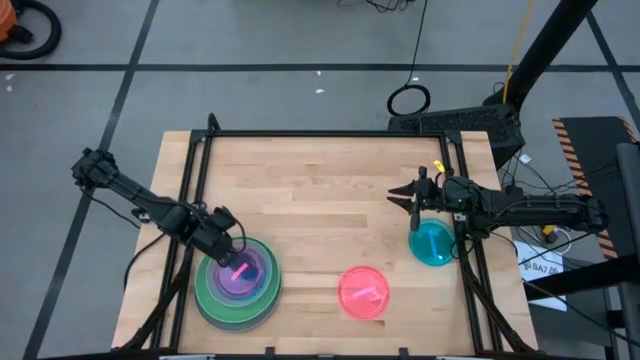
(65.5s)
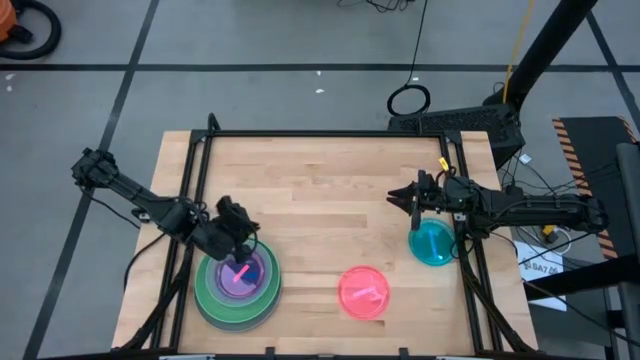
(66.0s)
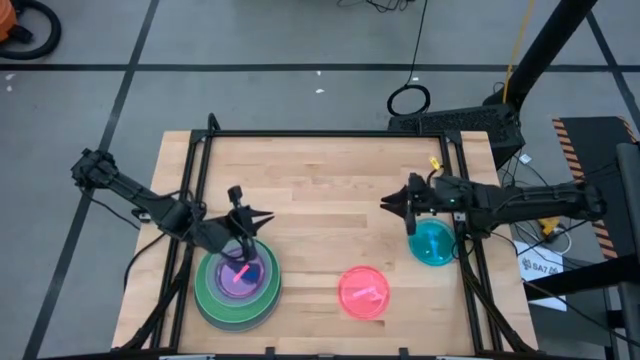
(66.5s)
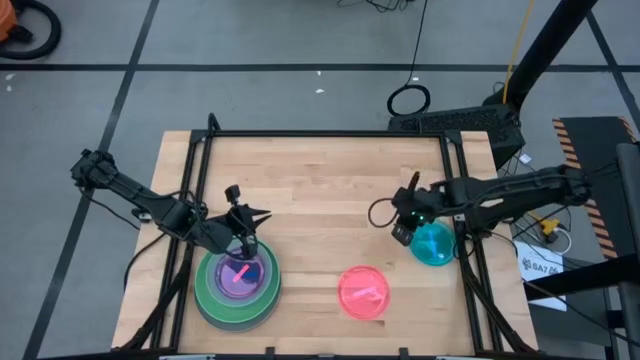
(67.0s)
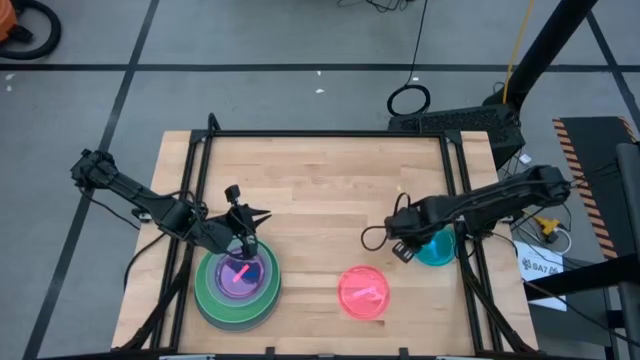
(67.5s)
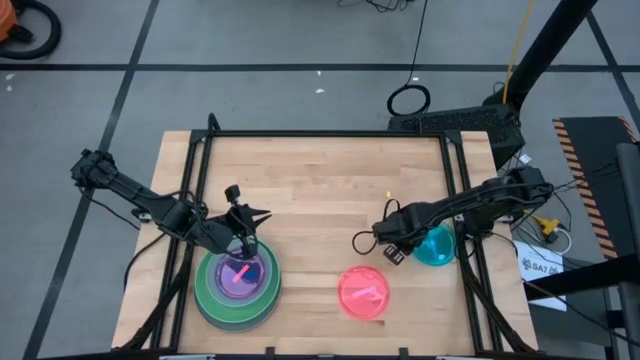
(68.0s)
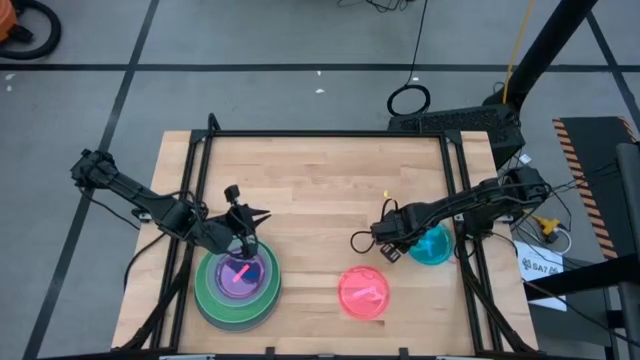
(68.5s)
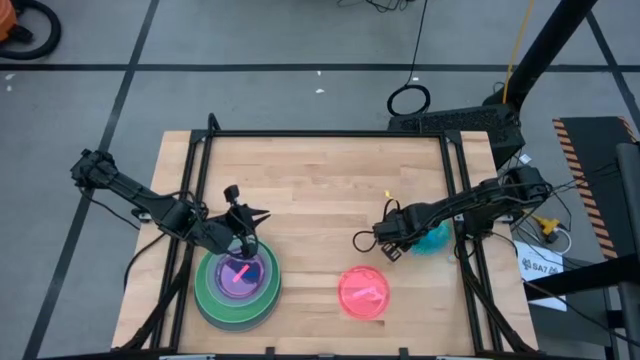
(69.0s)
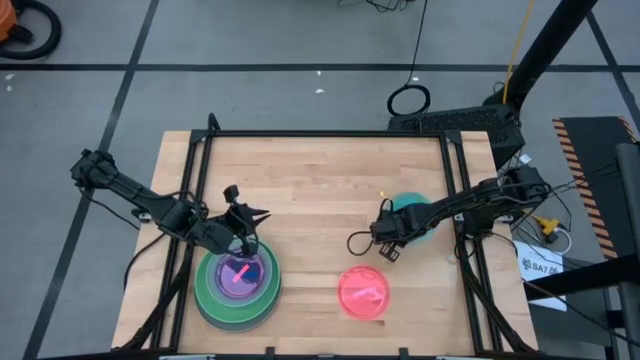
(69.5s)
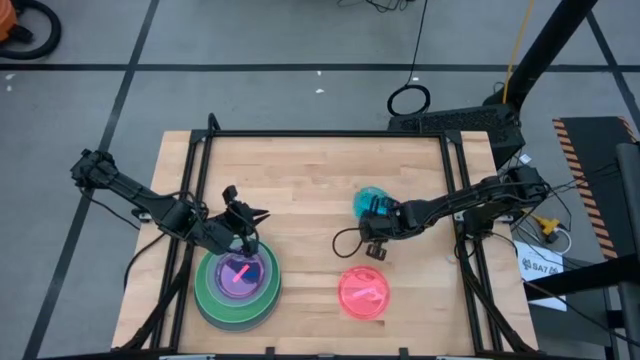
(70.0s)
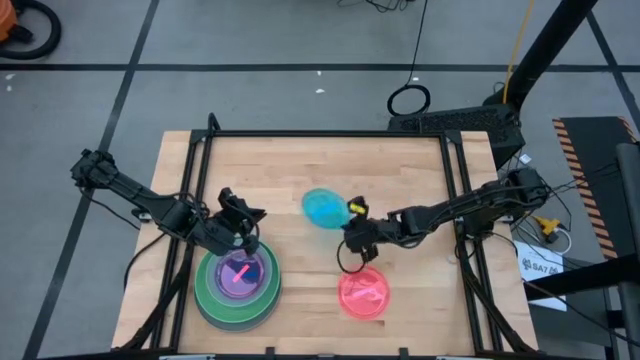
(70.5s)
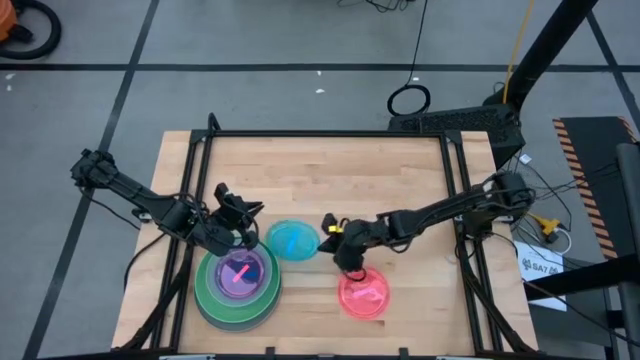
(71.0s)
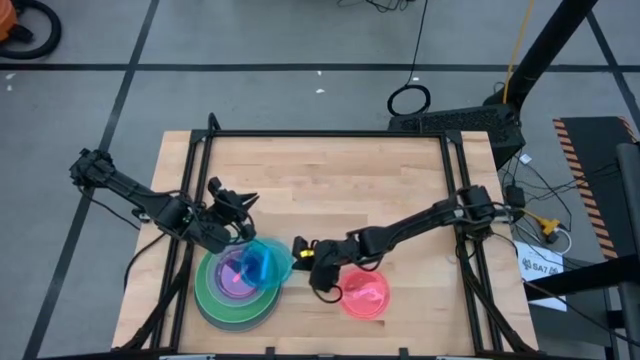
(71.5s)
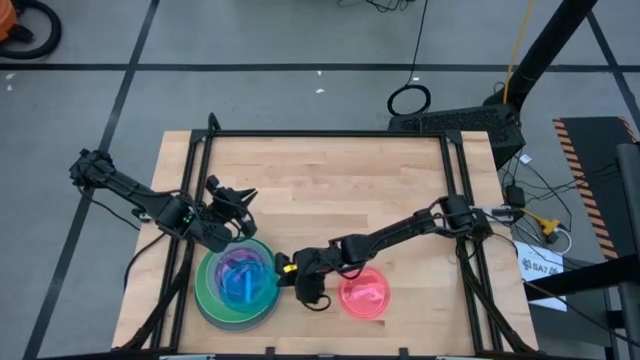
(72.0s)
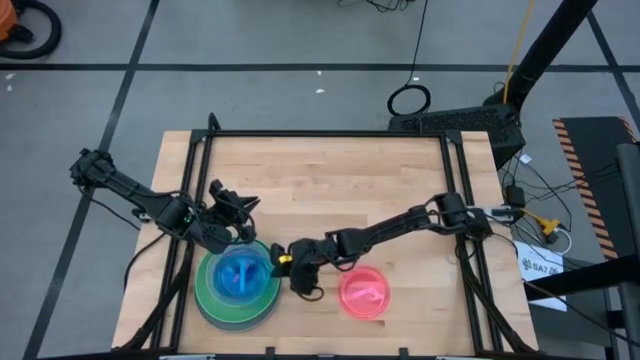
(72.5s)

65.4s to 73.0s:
Task: Stack plastic plates
Stack the transparent blue plate on the pink plate

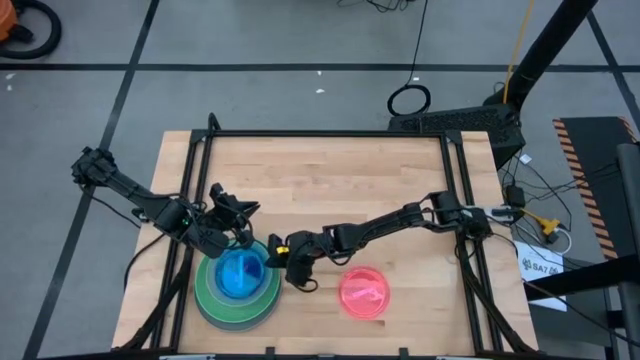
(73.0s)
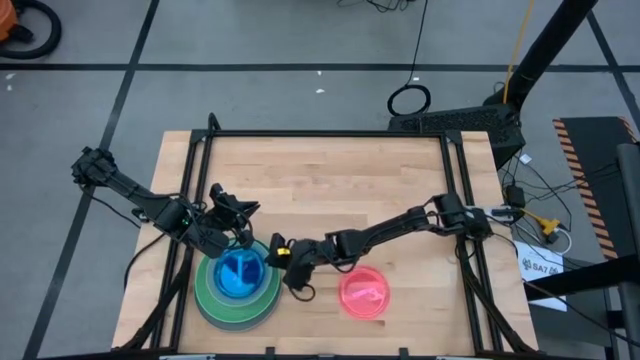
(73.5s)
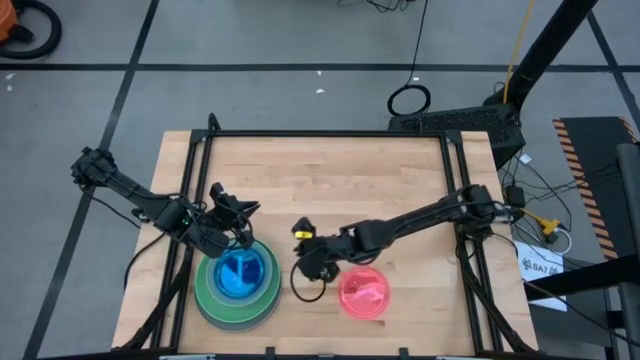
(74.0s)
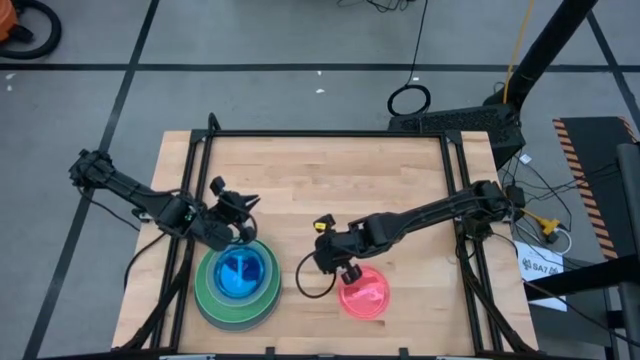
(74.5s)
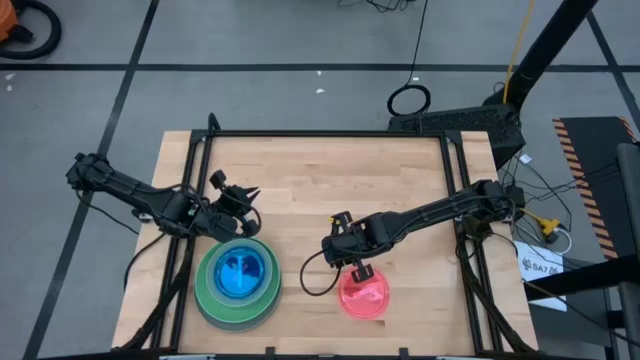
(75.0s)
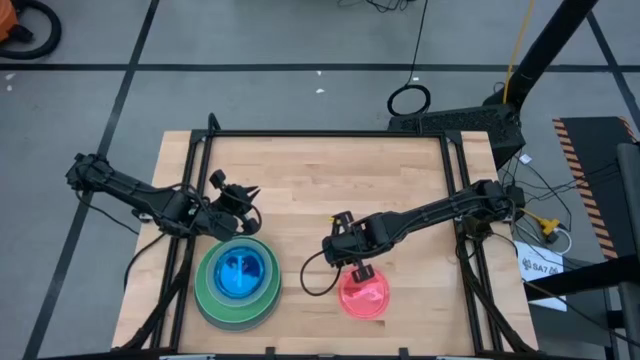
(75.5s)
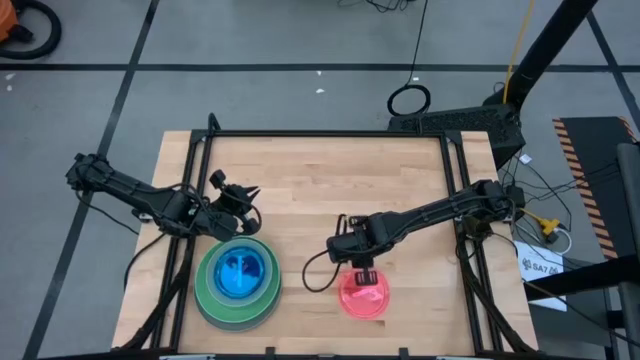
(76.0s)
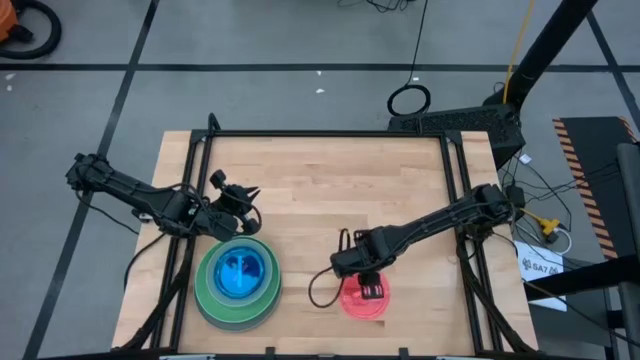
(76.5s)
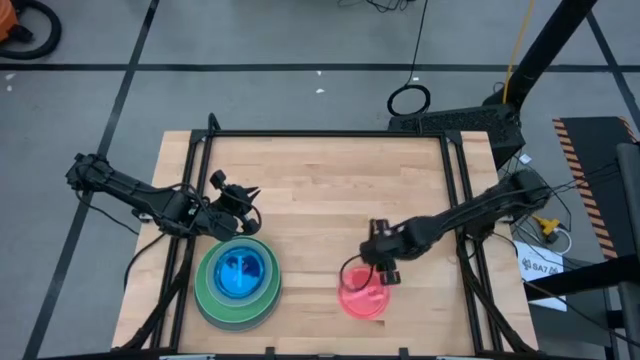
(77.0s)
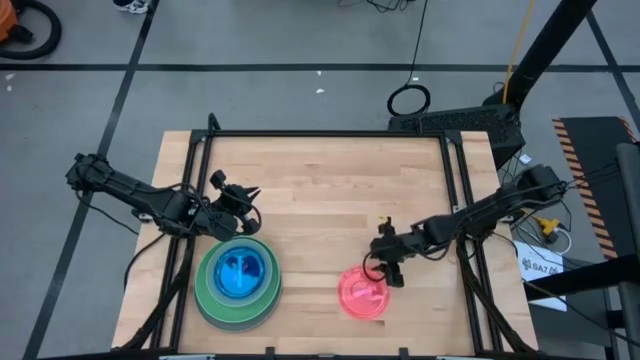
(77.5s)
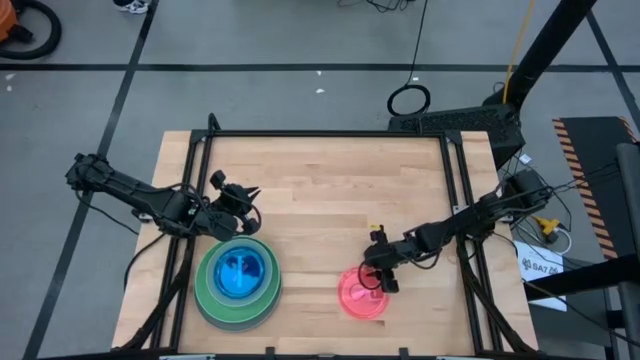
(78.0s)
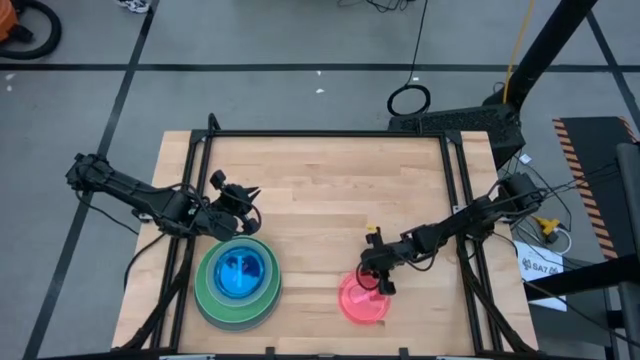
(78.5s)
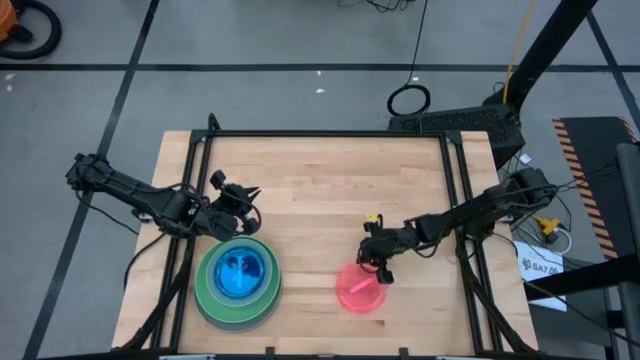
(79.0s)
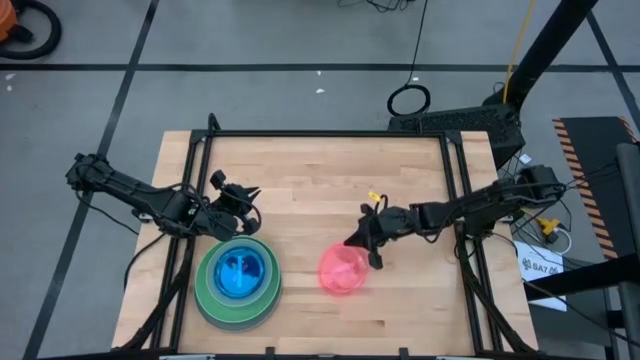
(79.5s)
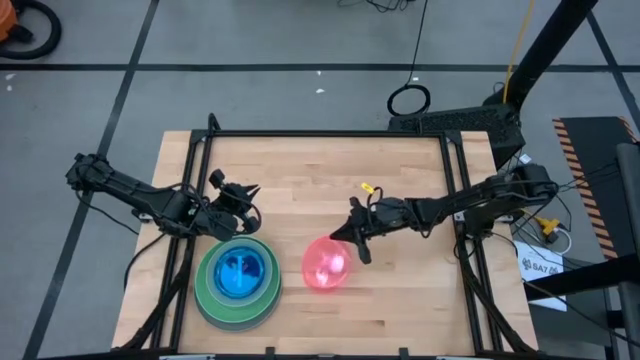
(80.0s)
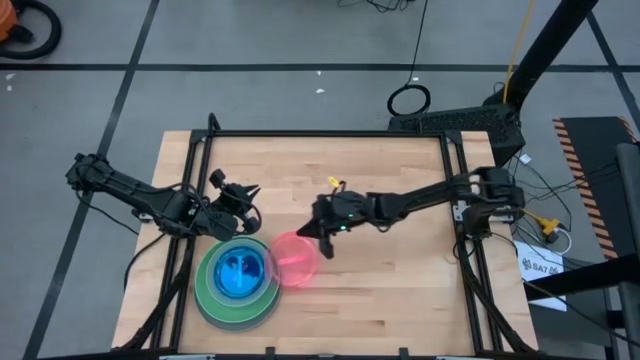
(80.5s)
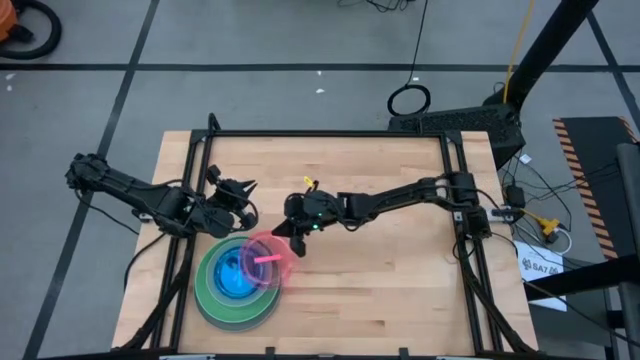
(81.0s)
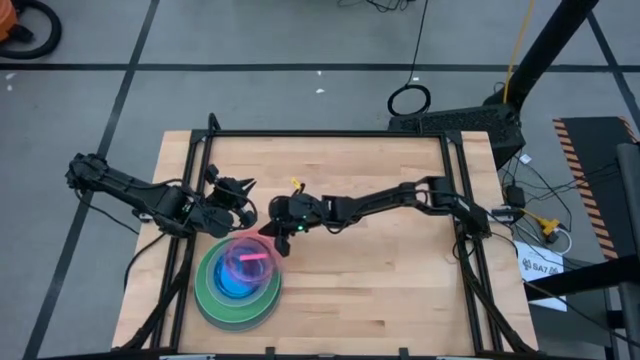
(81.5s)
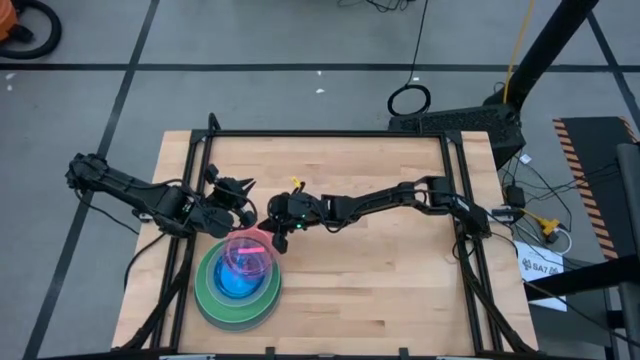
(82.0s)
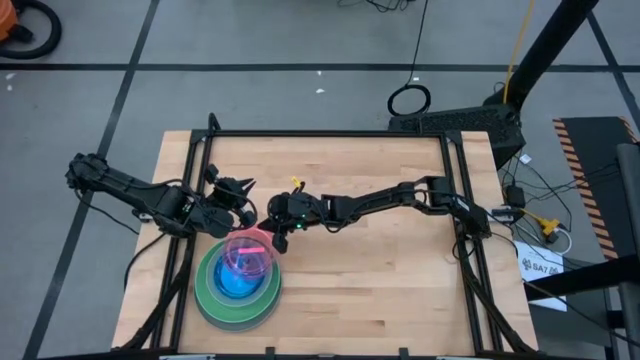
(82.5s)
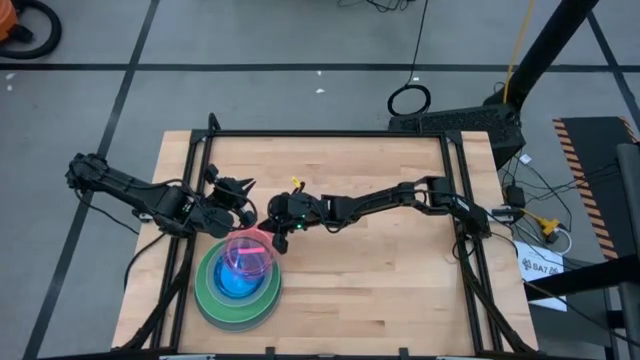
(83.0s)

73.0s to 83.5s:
Stack the pink plate on the transparent blue plate

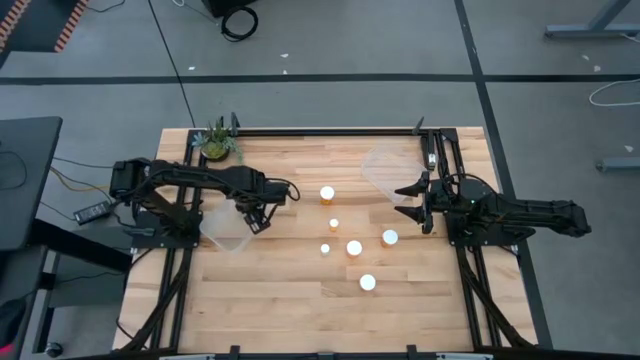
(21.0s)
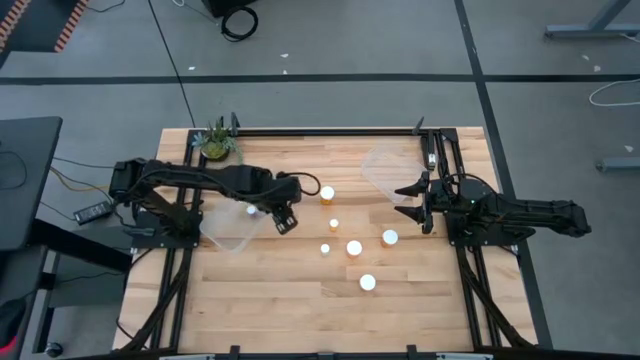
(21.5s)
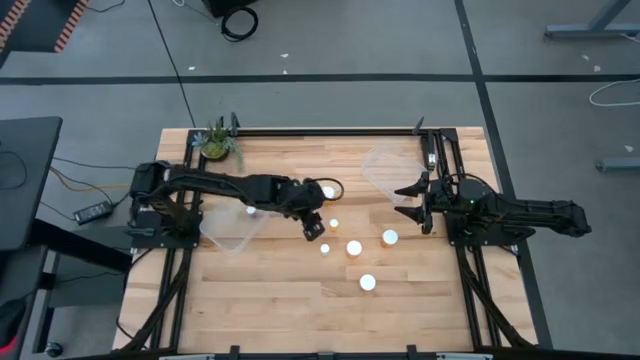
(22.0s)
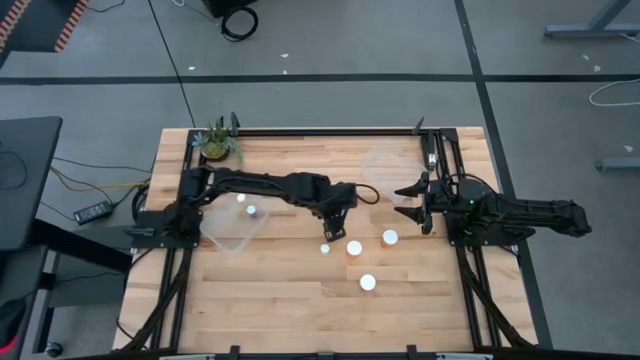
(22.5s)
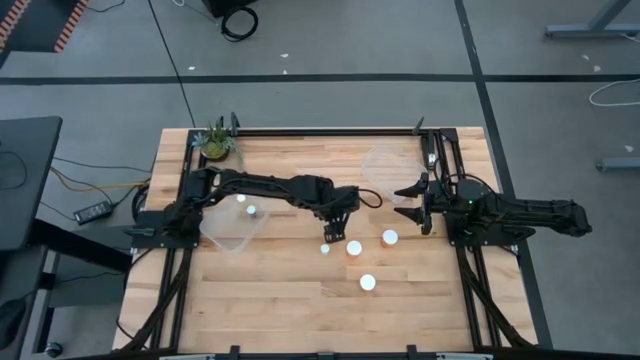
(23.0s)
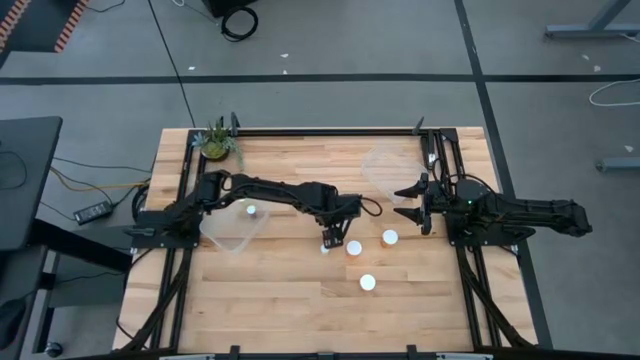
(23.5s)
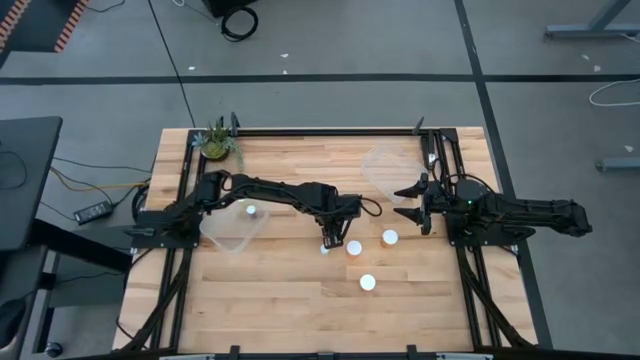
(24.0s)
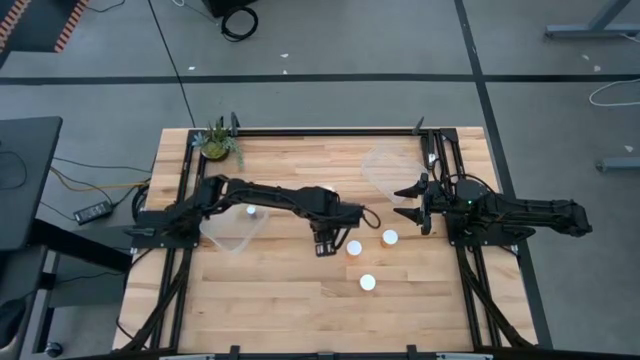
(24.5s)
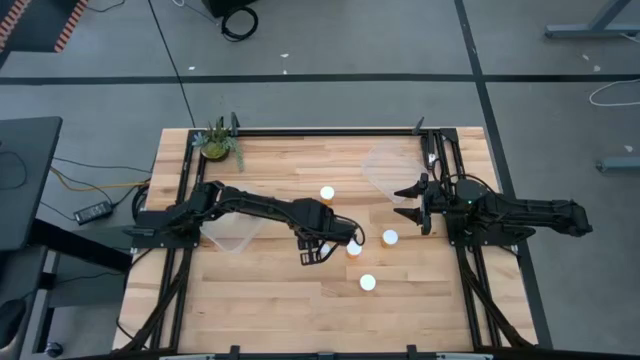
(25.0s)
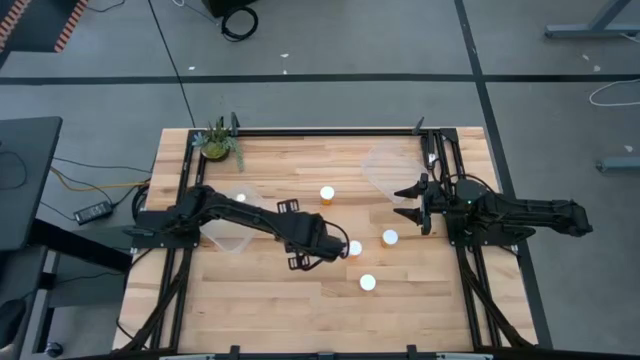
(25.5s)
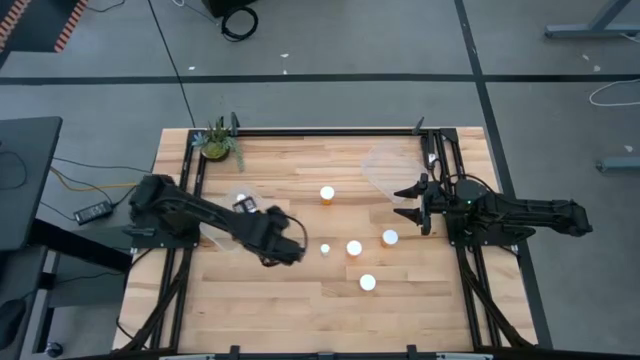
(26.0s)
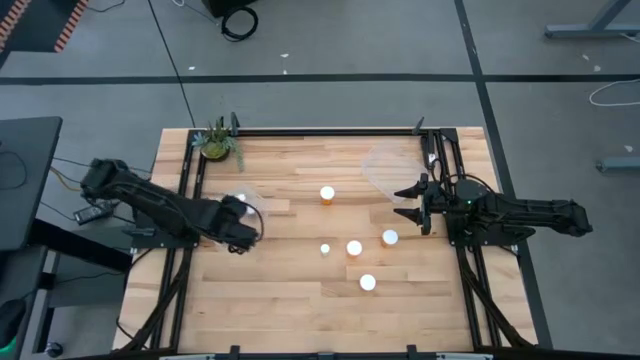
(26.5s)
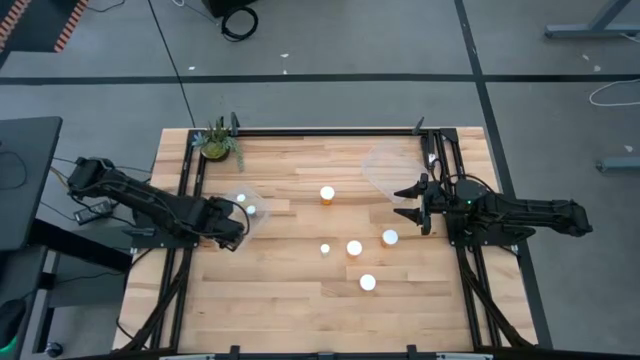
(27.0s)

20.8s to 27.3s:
Task: Pick and place medicine bottles into bin by pill shape (circle, oval)
Put the small orange pill bottle into the left transparent bin
